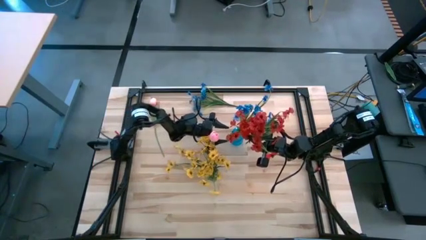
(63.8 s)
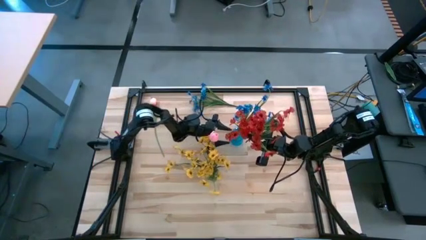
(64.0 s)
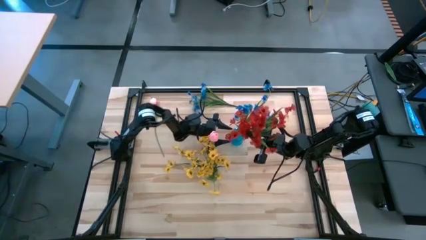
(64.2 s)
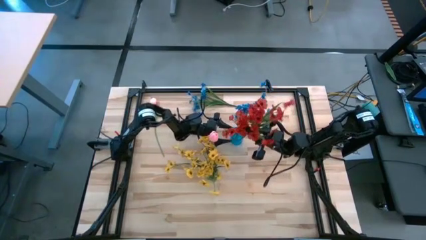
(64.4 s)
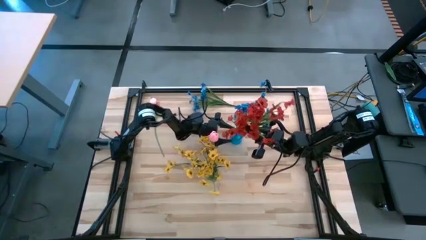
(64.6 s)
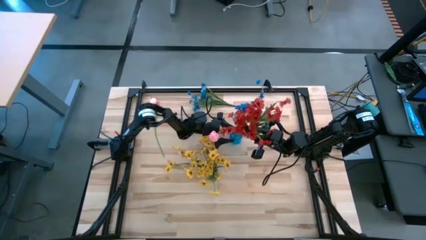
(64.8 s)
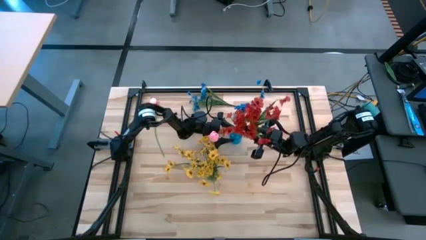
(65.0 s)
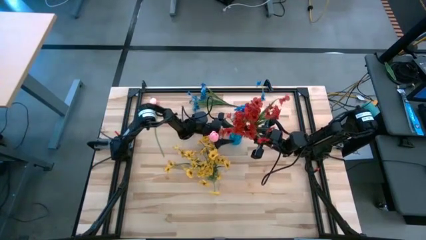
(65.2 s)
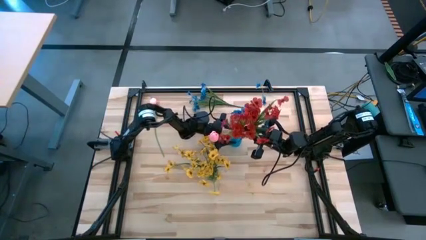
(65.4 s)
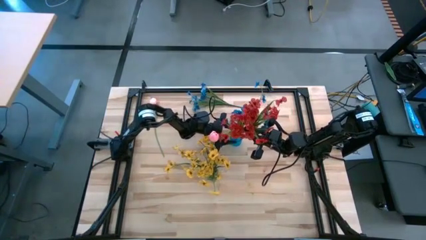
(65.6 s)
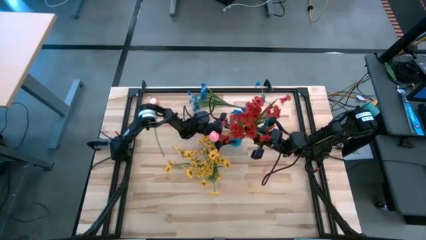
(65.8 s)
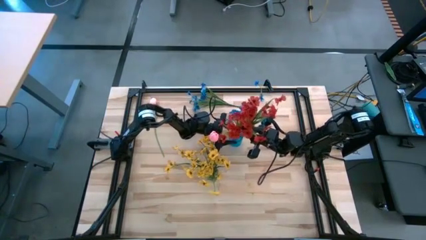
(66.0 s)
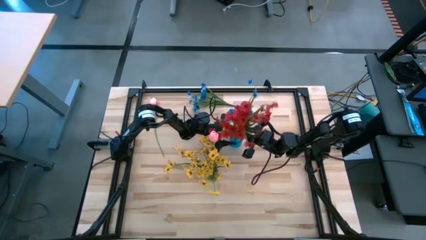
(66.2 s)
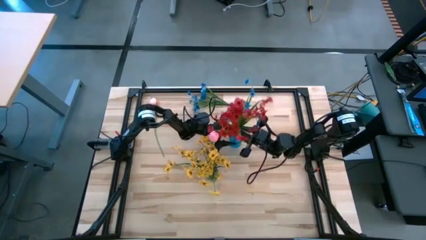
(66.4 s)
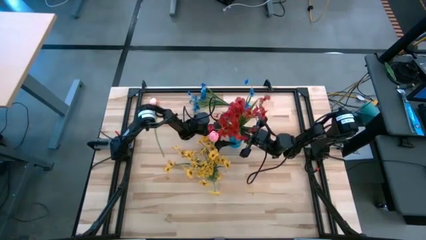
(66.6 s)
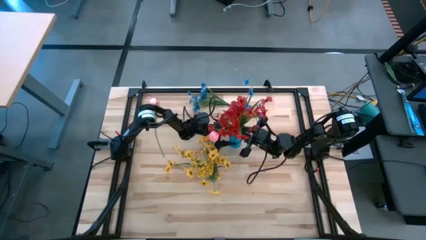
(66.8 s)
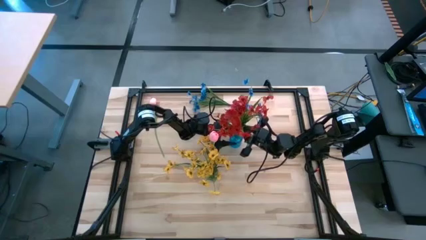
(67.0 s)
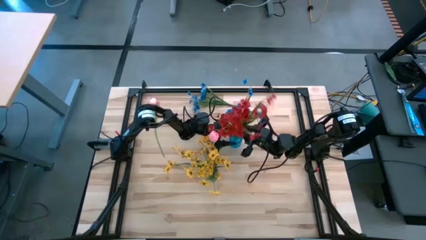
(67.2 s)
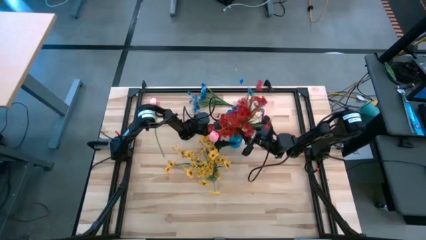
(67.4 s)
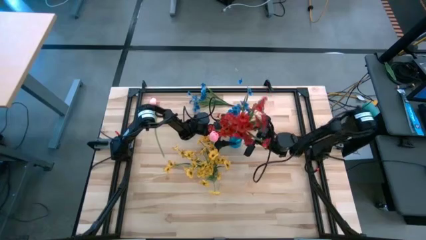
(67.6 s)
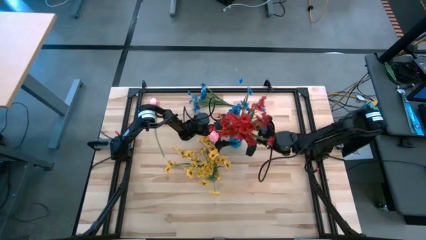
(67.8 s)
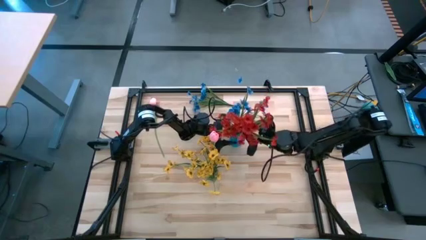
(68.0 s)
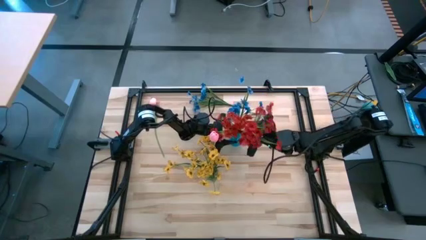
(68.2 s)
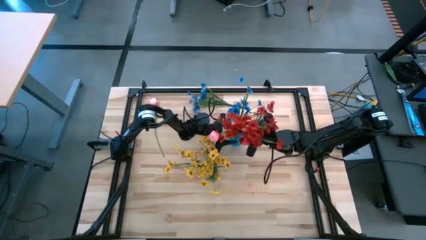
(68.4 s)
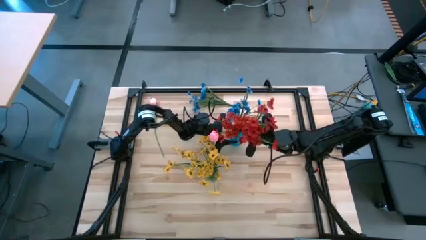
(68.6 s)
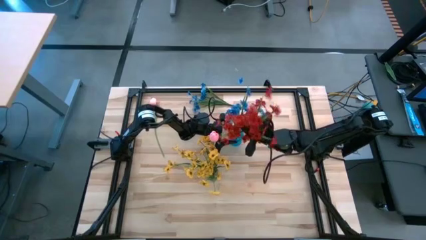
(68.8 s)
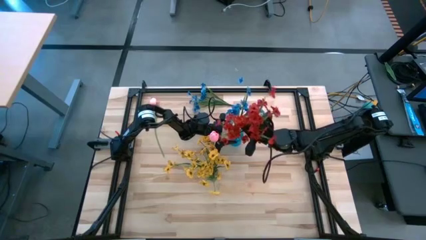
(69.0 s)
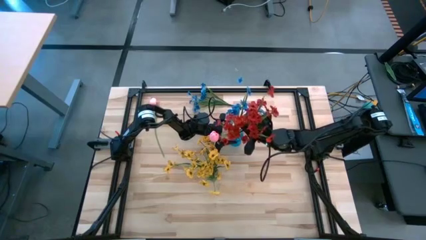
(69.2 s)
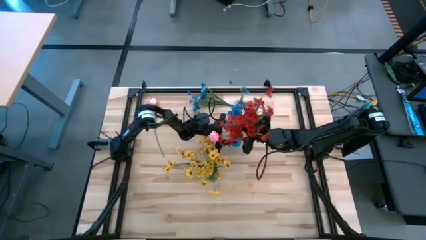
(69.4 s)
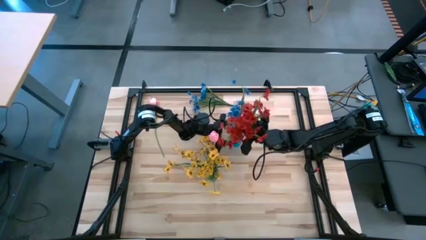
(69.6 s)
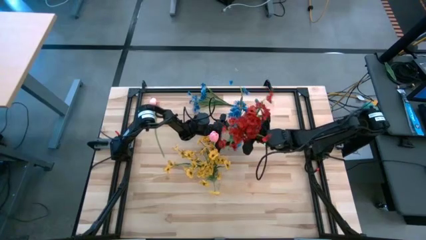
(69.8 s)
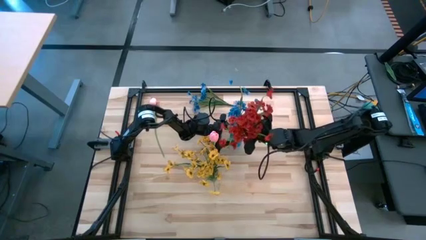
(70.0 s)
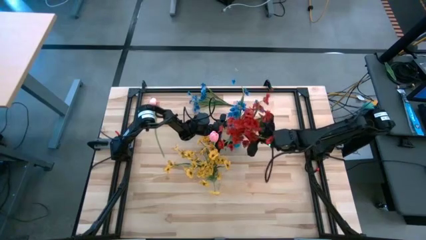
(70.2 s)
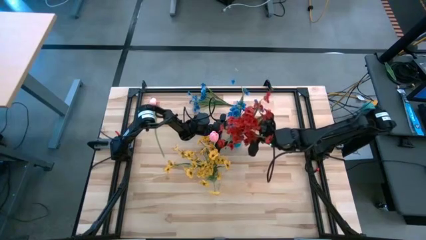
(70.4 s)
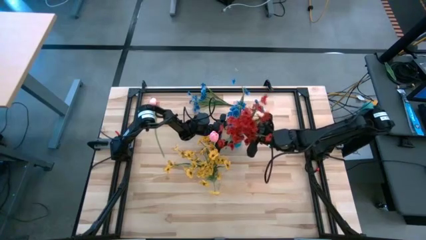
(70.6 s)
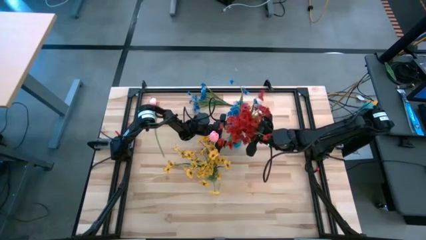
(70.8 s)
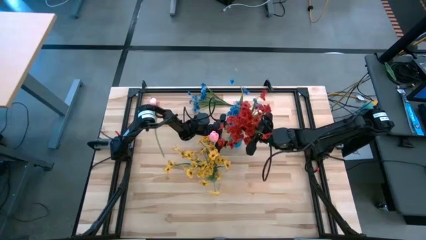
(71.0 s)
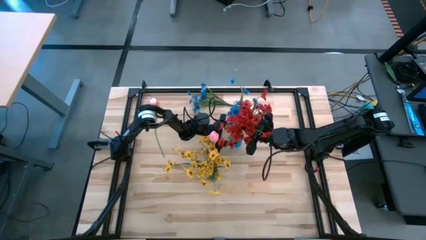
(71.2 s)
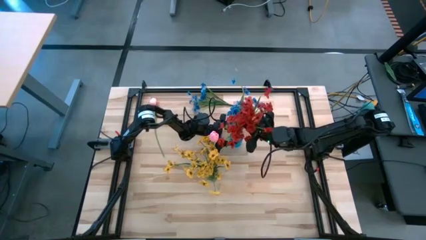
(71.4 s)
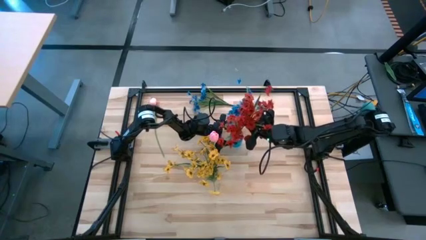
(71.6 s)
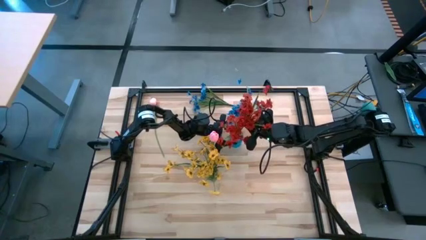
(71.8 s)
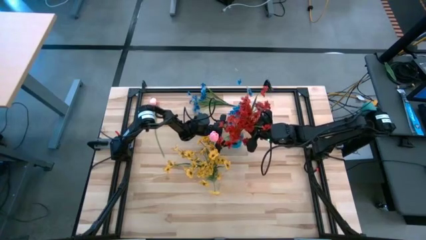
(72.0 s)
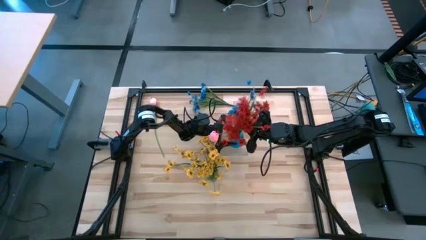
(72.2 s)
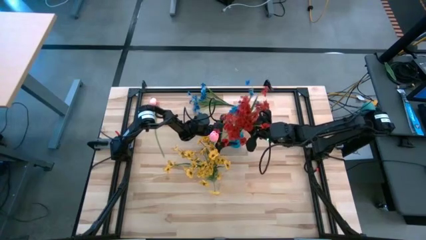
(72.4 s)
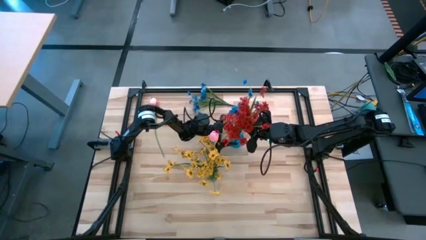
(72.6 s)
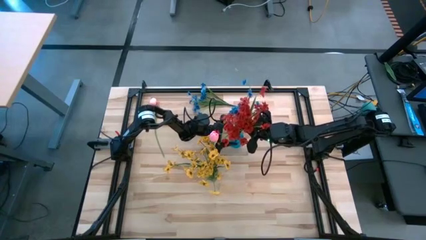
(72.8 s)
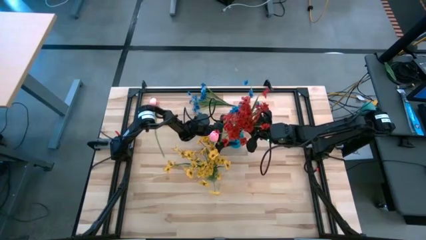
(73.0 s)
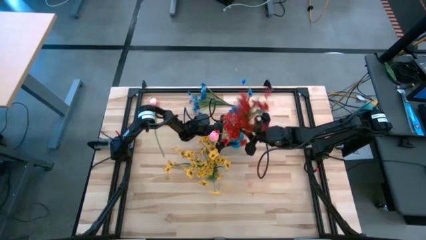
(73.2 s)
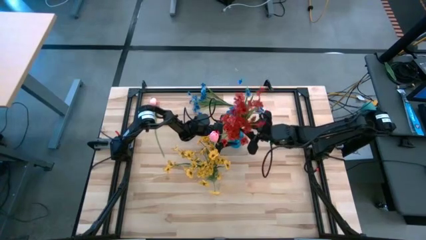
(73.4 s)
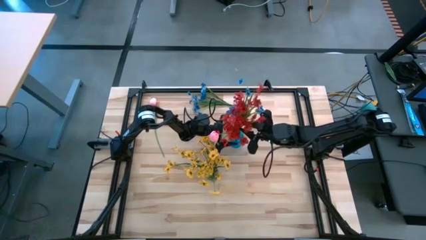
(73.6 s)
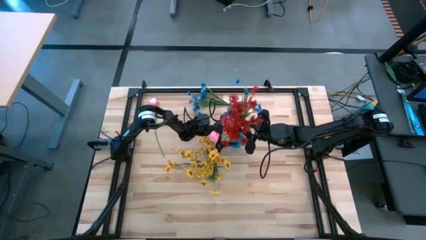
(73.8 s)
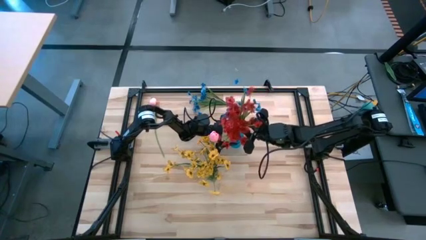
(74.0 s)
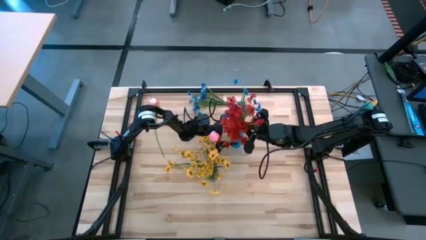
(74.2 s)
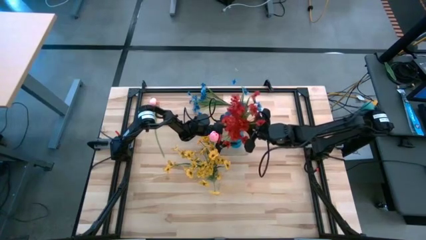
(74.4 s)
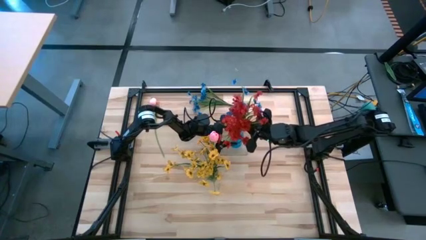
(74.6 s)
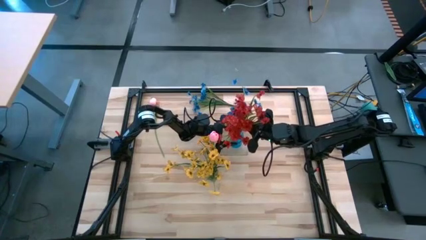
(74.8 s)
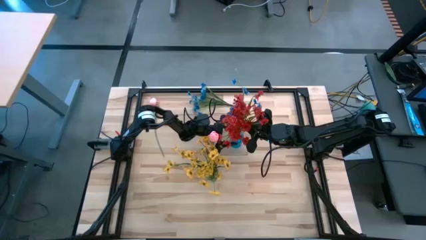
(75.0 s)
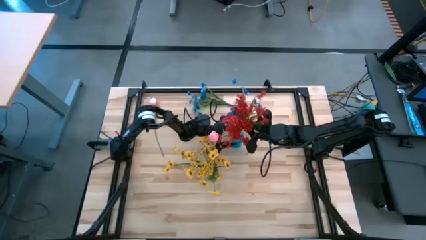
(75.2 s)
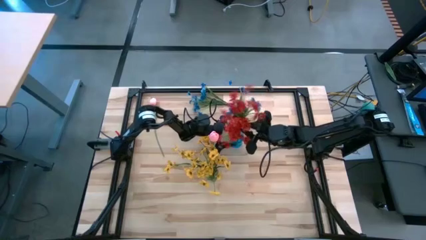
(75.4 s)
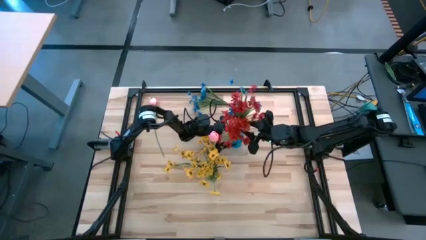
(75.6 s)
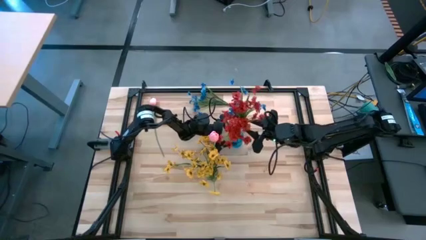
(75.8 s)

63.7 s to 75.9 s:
Task: Sort flowers into vase by color
Put the red flowers into the blue flower vase

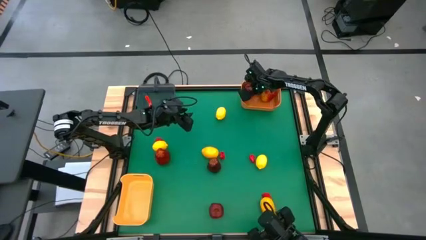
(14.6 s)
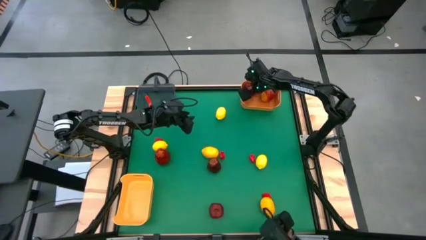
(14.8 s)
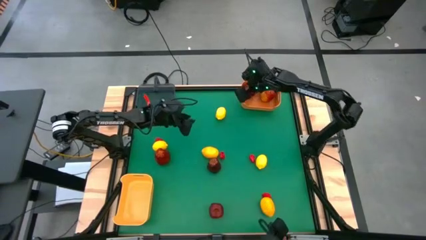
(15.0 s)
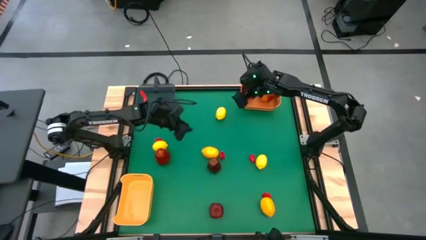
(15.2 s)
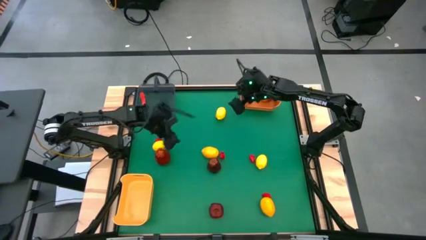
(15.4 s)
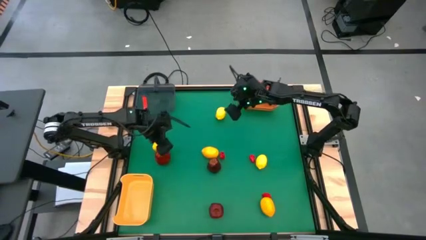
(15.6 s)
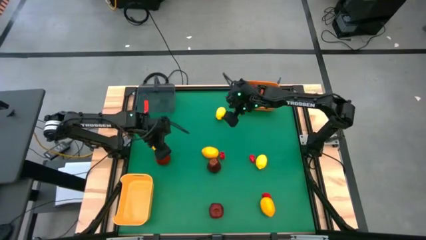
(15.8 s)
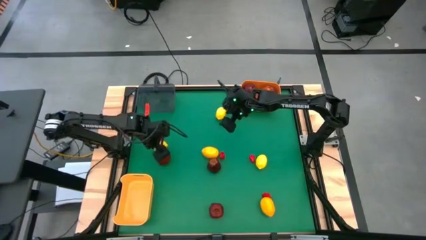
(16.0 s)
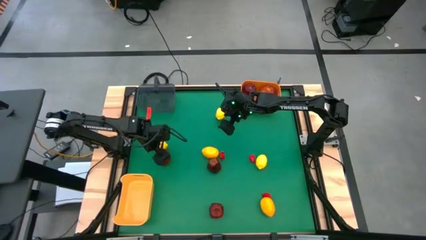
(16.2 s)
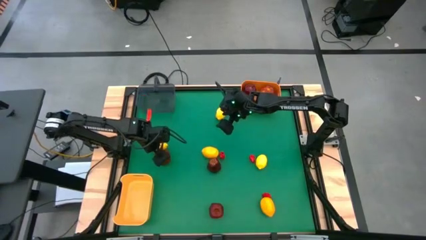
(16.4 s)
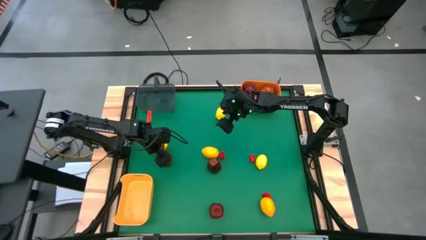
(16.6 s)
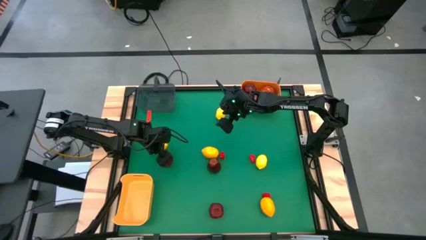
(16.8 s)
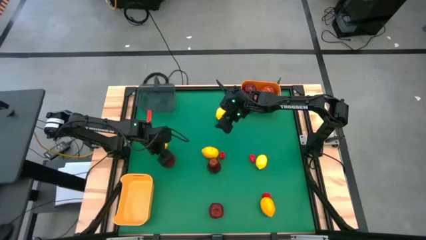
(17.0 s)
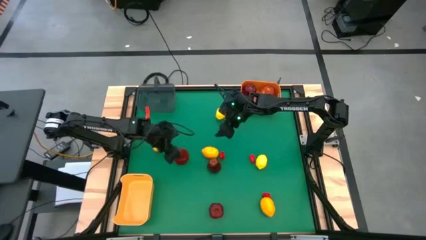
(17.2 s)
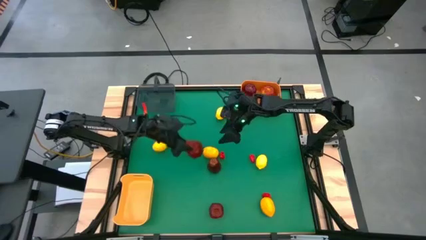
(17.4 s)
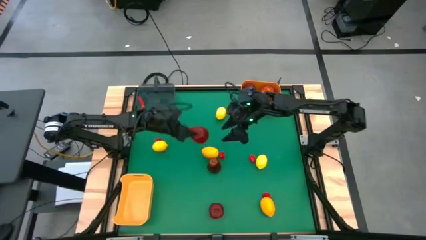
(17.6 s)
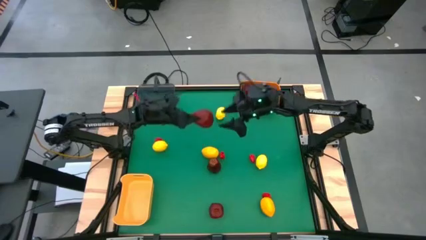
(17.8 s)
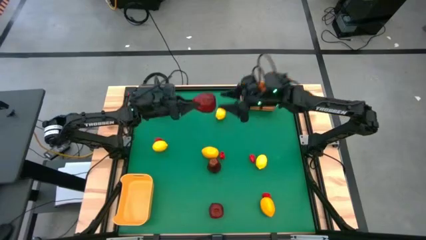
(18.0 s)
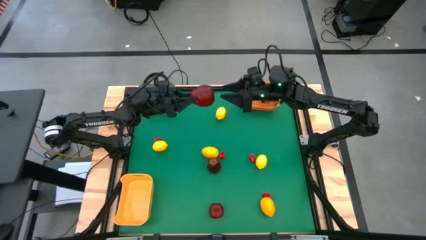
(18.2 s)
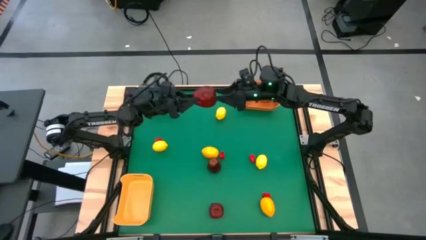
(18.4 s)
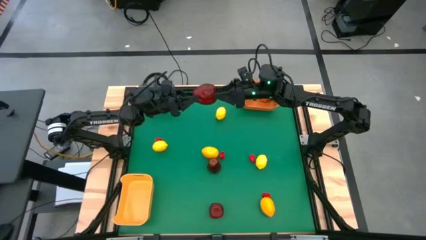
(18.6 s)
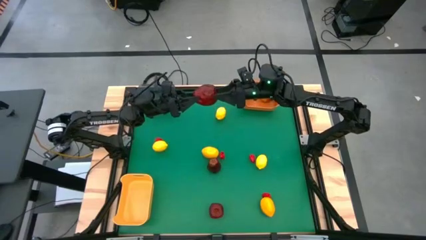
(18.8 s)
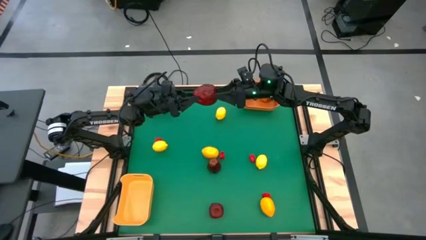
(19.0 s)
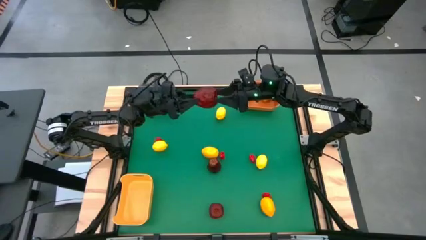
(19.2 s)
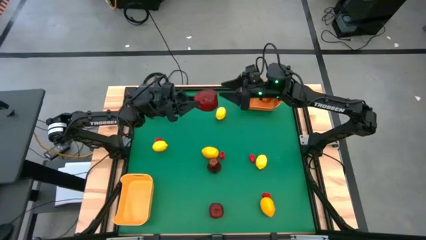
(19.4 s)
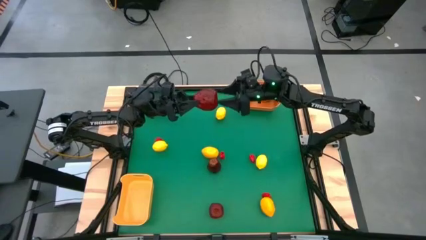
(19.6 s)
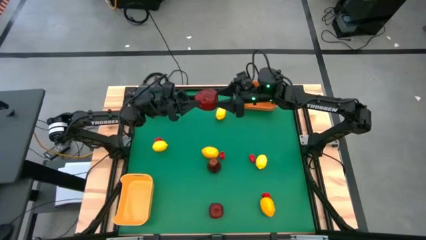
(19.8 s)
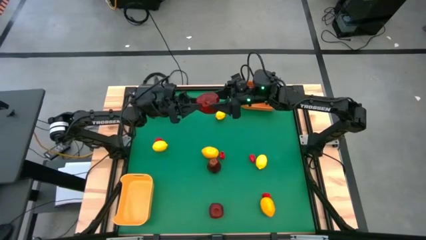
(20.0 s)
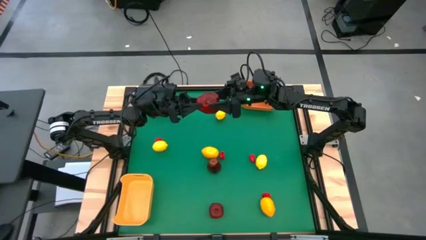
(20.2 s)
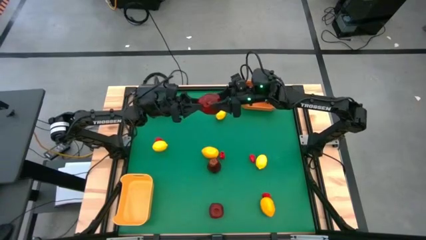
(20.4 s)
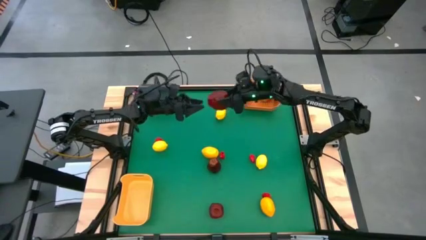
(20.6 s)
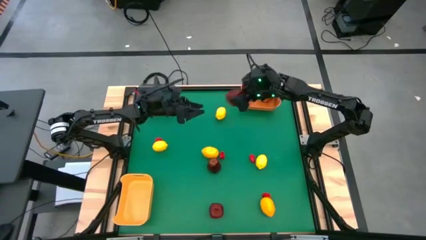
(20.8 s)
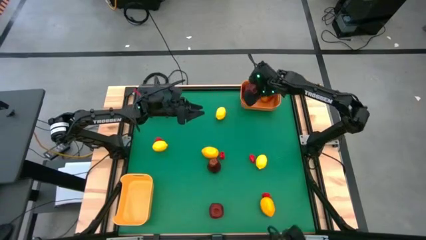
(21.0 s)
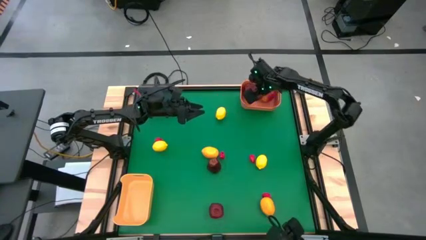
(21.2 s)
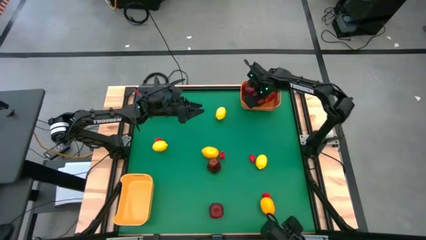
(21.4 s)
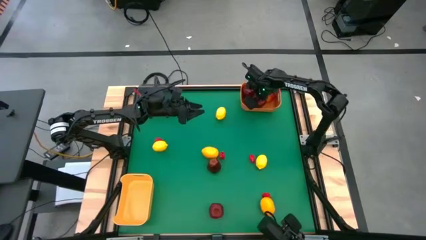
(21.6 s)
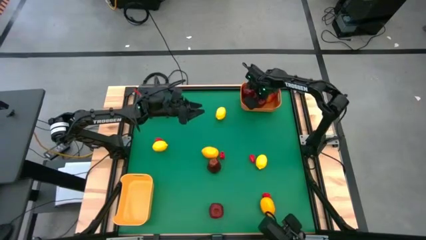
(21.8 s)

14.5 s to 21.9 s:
Task: Sort produce into baskets
Put the apple into the orange bin
